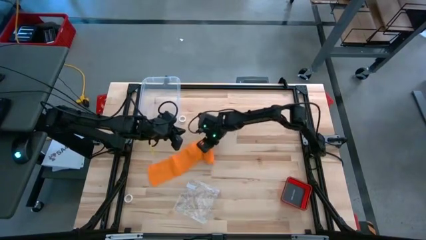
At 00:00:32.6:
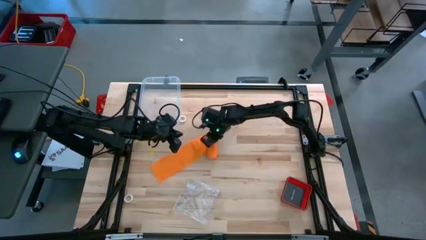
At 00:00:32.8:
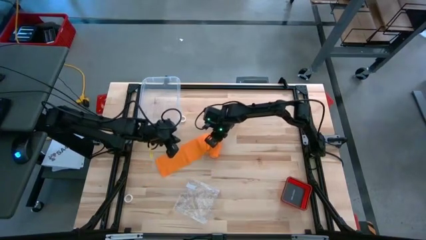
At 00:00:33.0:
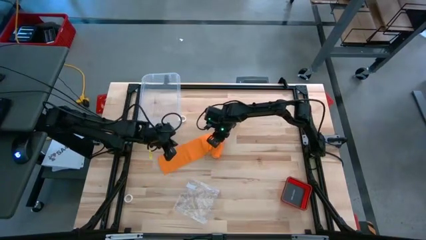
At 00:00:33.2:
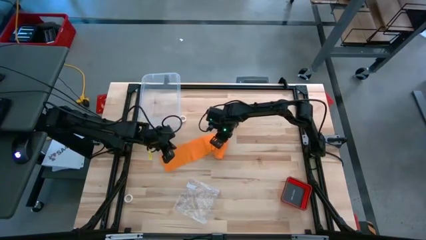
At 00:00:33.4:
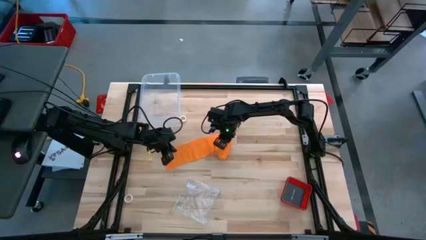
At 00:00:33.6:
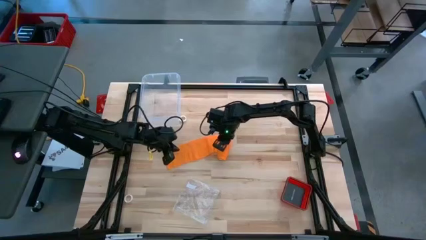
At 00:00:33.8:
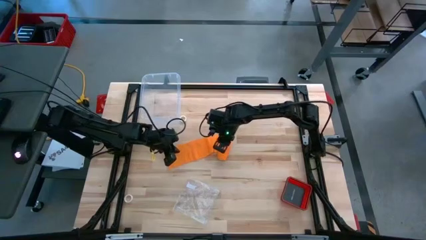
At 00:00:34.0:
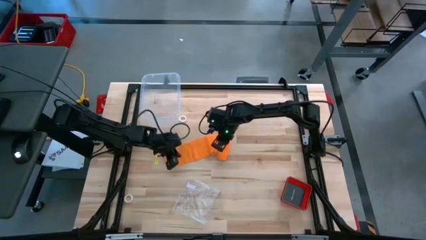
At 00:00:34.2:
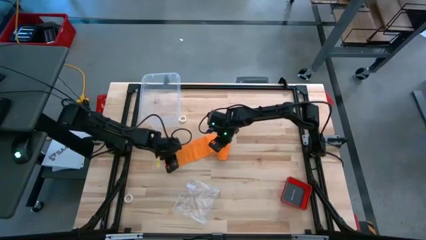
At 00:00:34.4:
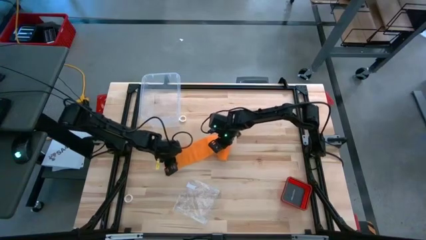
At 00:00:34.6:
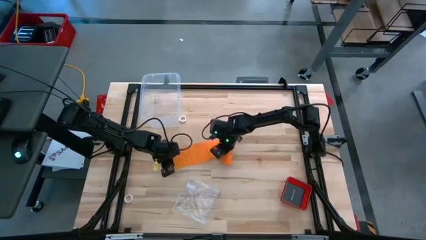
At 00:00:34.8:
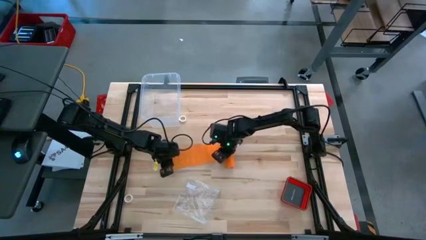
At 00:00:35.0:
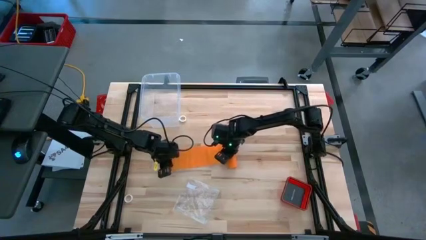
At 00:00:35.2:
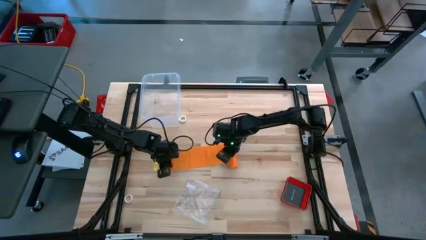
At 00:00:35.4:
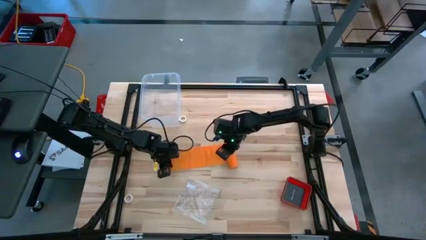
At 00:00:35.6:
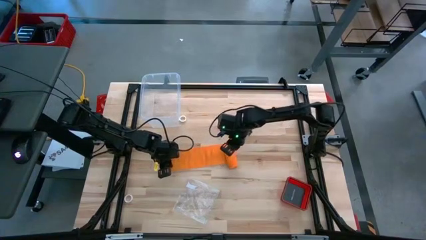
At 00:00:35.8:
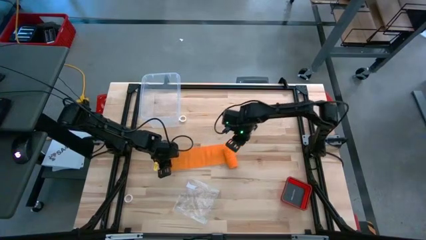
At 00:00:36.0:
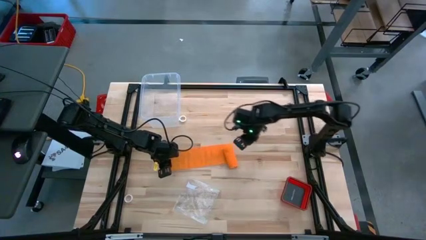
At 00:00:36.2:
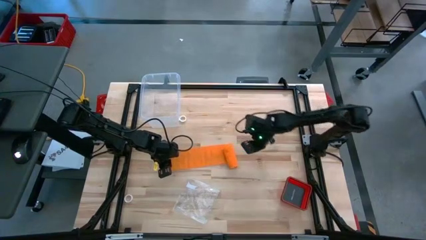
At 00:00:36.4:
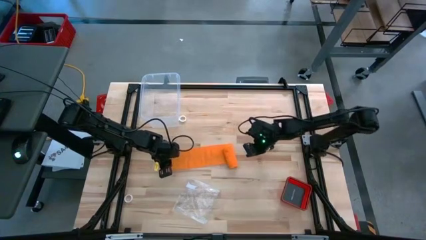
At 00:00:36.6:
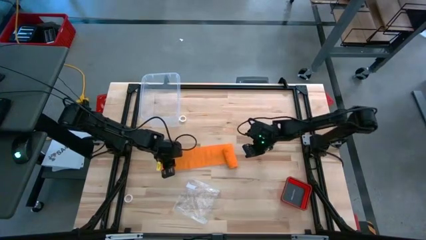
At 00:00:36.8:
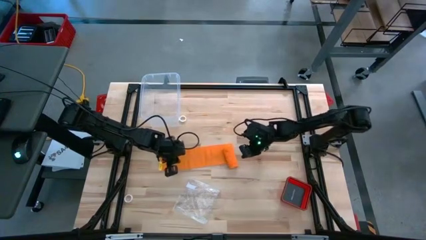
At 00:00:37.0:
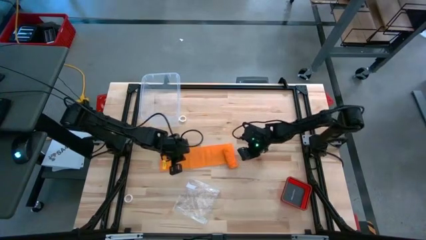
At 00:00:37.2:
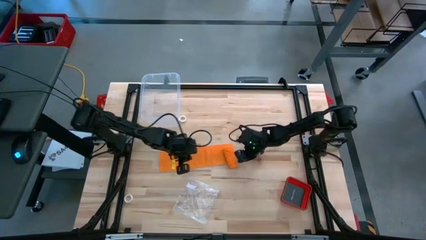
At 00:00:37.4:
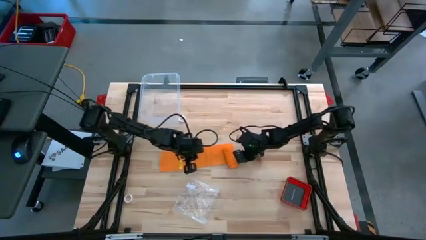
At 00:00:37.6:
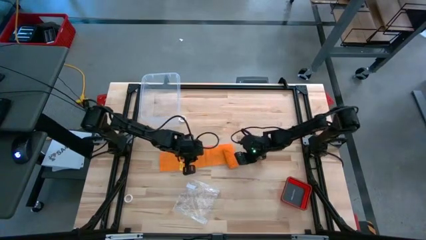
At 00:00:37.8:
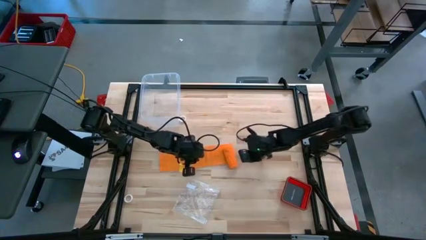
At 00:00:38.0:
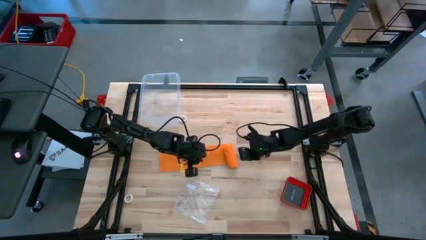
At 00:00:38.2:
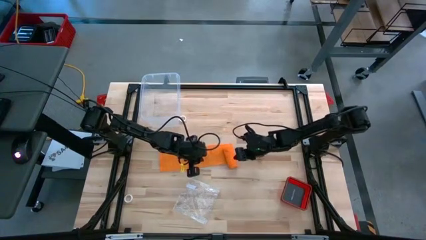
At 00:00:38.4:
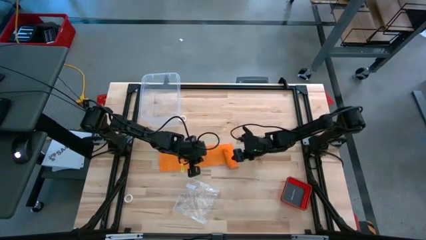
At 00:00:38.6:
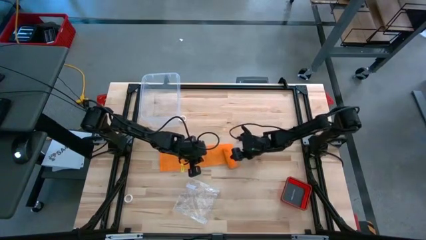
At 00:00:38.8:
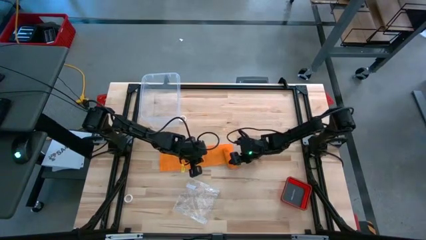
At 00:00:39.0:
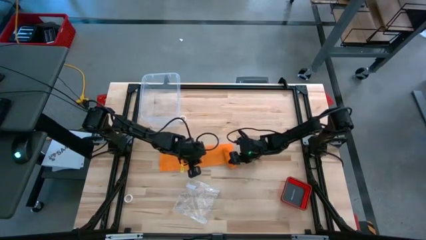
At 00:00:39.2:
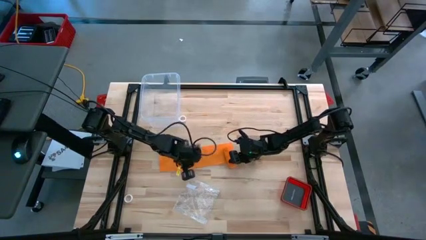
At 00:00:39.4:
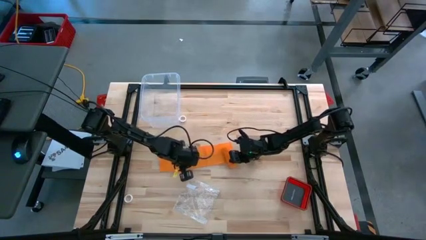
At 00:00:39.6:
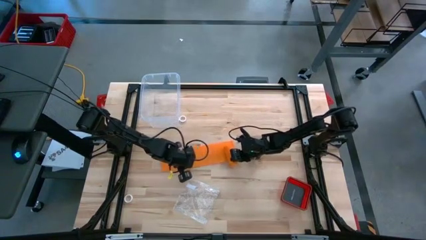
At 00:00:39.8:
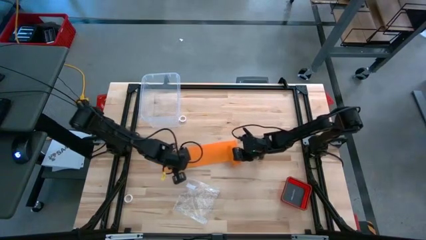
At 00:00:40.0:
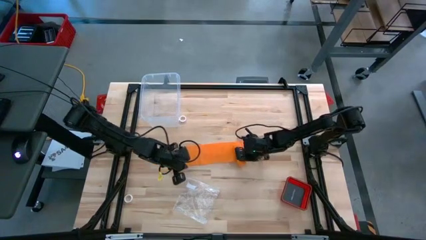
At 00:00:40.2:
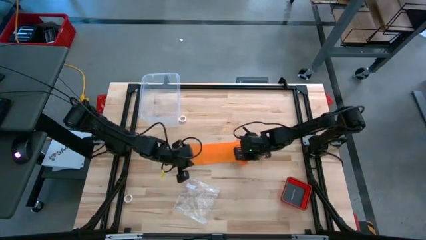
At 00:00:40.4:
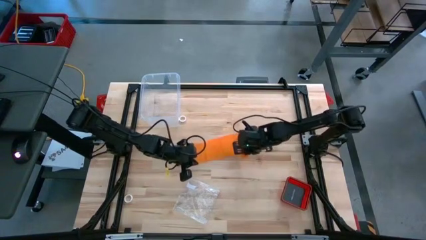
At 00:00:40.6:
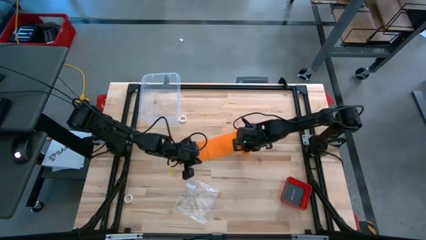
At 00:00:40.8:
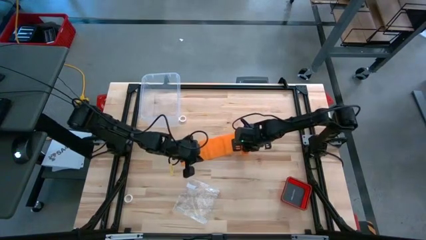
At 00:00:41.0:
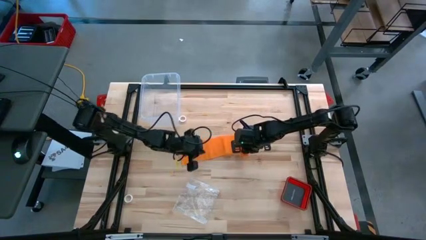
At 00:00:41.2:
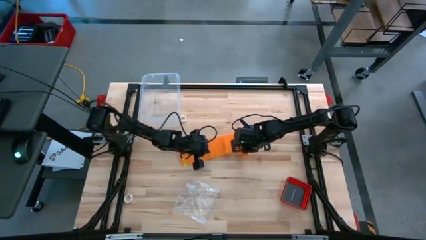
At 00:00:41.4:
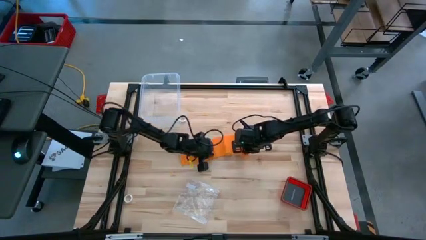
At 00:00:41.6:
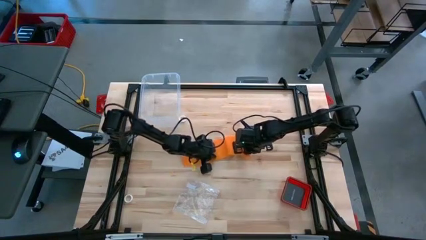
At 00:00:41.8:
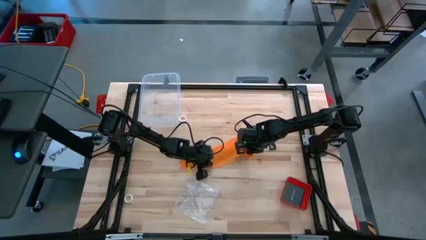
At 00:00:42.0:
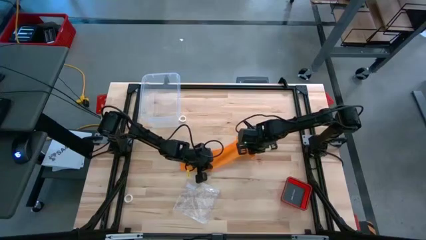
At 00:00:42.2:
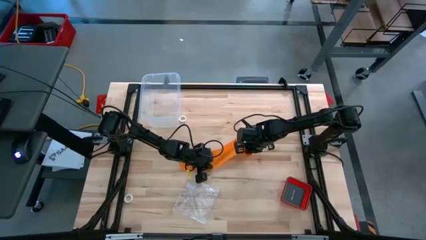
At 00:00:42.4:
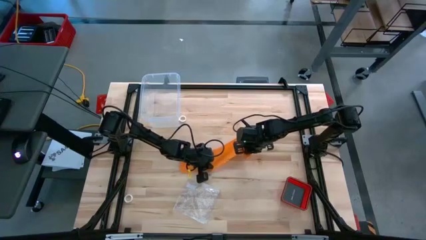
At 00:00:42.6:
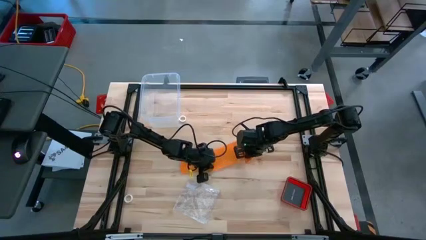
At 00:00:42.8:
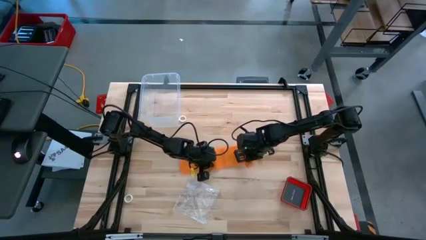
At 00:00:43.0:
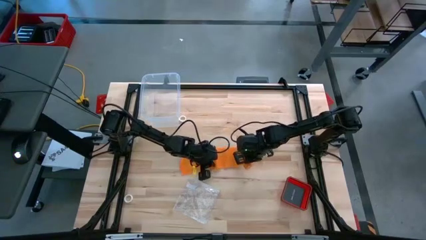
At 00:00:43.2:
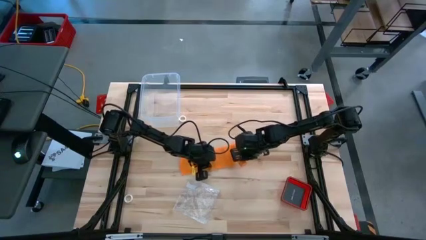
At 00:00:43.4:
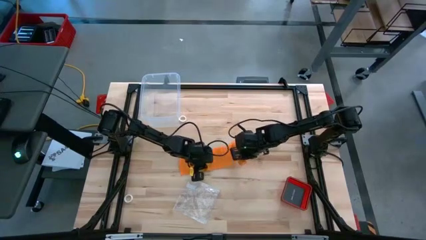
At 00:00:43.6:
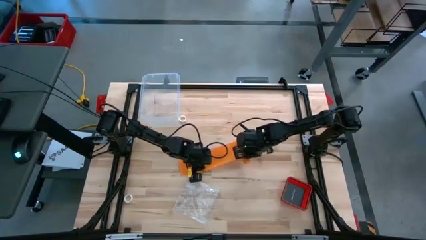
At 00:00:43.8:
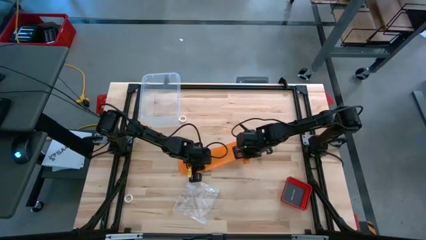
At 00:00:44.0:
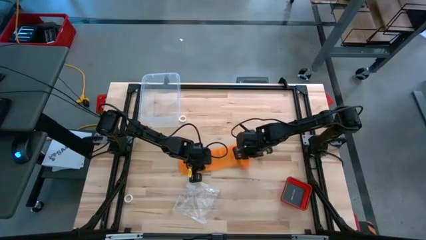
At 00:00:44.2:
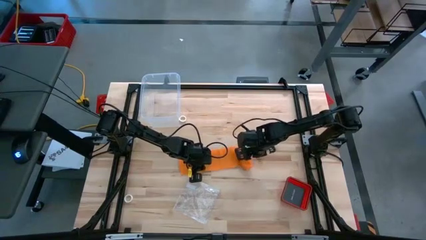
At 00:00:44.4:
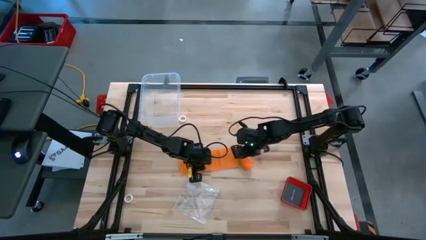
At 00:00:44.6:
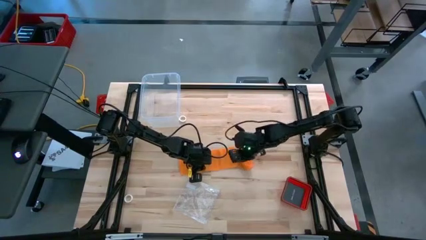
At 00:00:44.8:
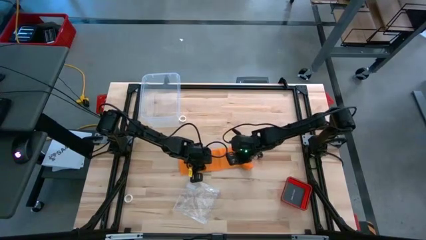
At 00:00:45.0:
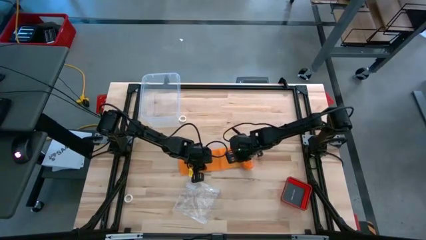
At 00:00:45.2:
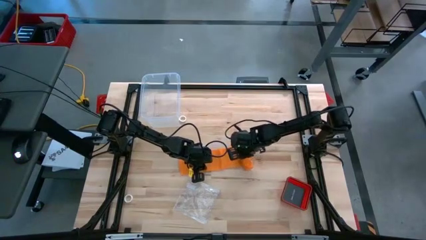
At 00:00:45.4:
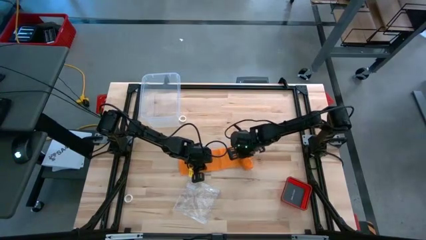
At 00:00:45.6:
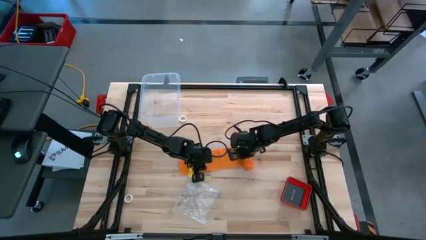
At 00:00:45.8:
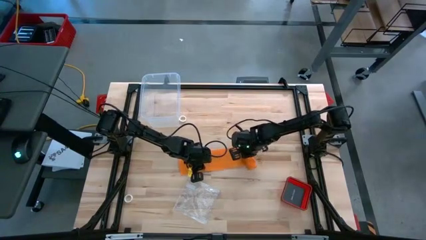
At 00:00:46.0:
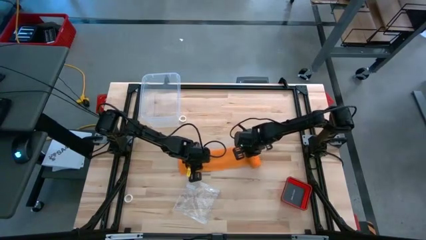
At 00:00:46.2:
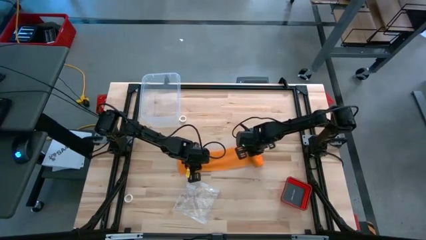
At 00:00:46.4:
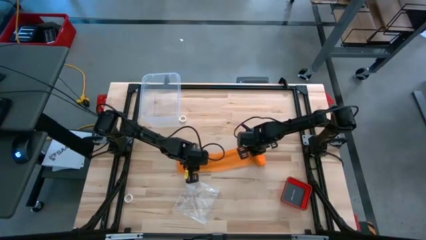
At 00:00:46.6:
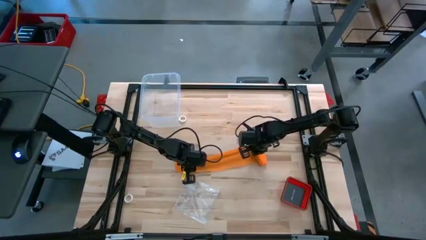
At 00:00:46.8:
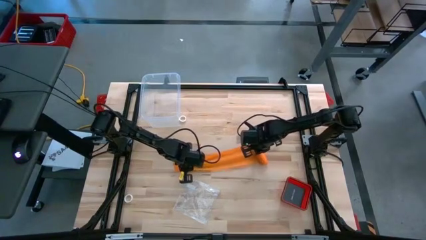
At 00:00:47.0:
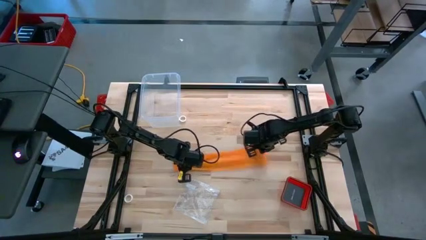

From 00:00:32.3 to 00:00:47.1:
Task: Roll bandage
Roll the orange bandage

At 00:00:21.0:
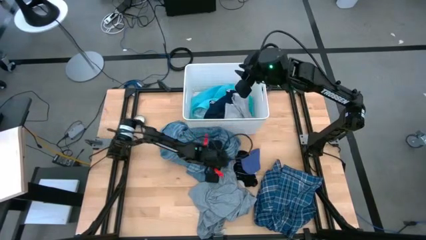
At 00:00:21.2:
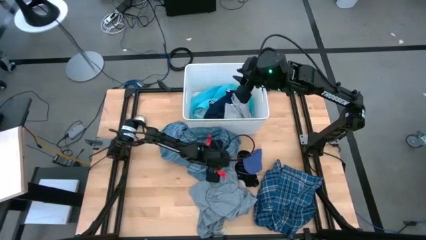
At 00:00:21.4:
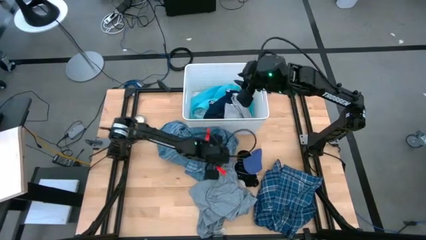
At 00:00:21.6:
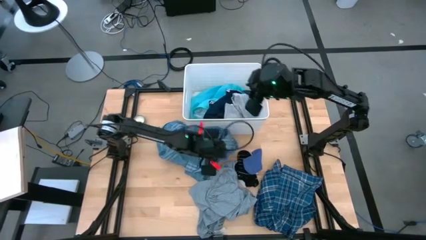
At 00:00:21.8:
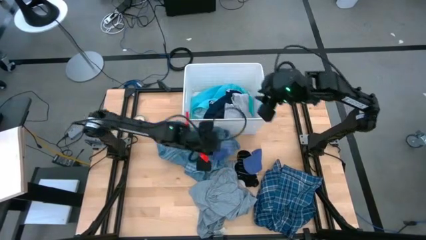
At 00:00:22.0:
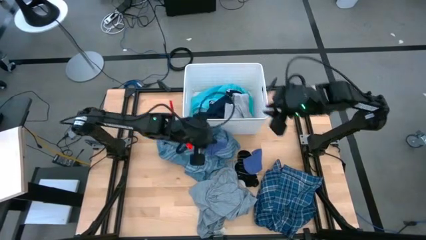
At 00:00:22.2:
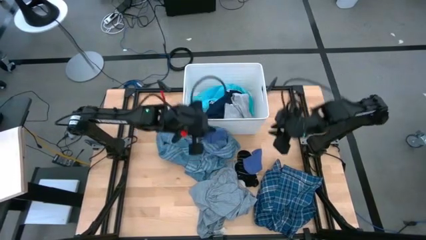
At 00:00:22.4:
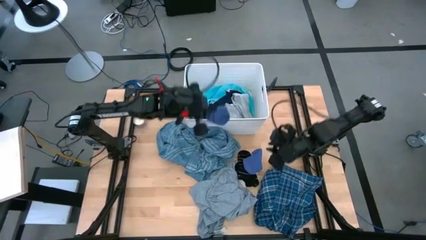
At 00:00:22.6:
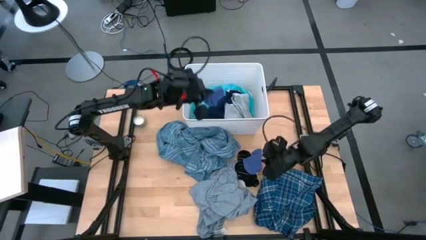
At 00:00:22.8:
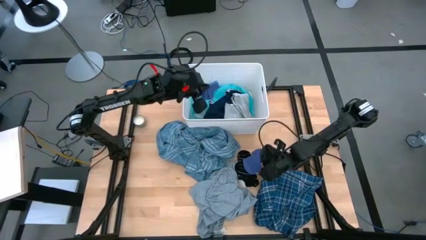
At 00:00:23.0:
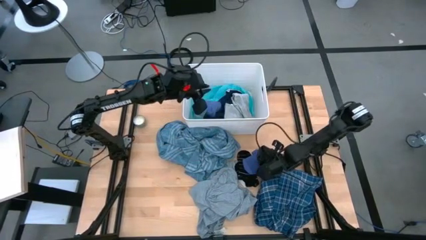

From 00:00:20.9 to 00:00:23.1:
Task: Sort clothes
Put the blue sock into the white laundry organizer

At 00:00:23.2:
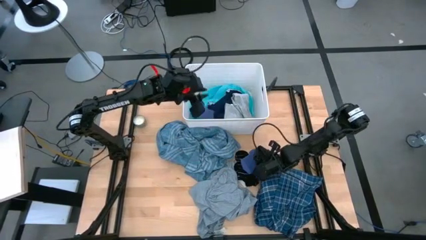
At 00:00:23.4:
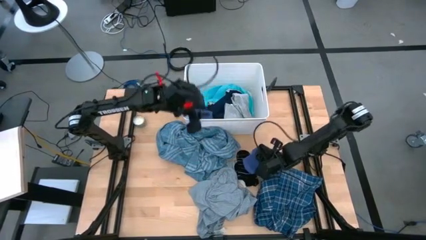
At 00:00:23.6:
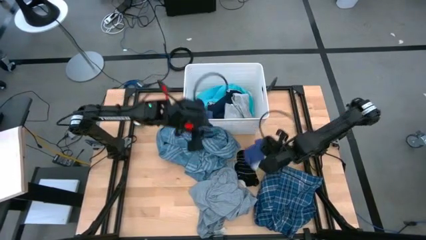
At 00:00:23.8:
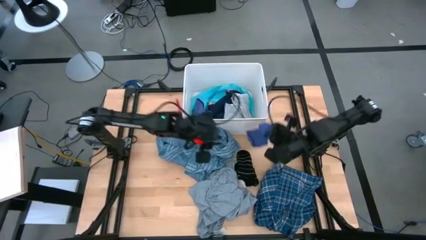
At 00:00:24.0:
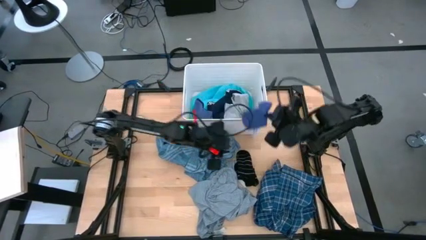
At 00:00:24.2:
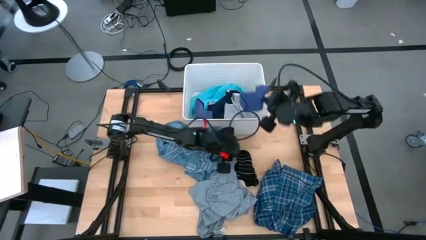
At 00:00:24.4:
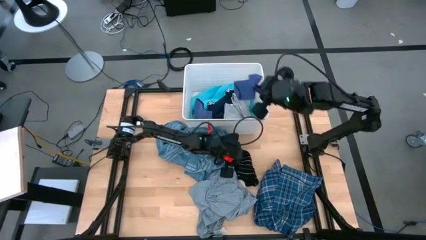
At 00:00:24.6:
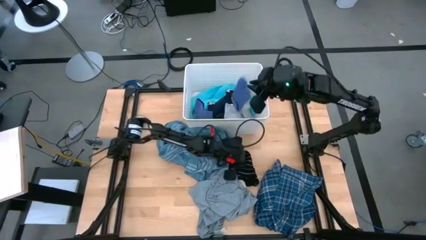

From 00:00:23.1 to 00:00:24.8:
Put the blue sock into the white laundry organizer
